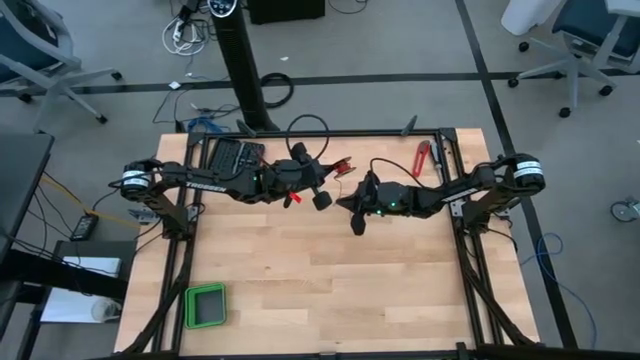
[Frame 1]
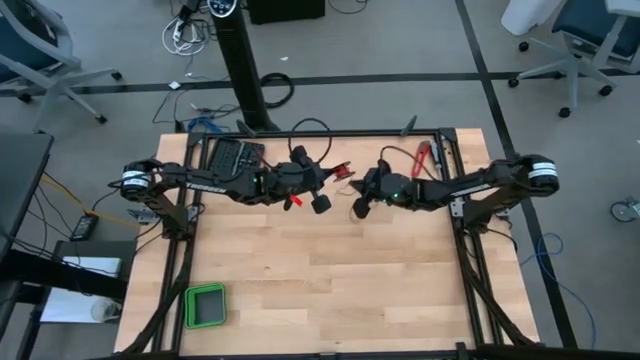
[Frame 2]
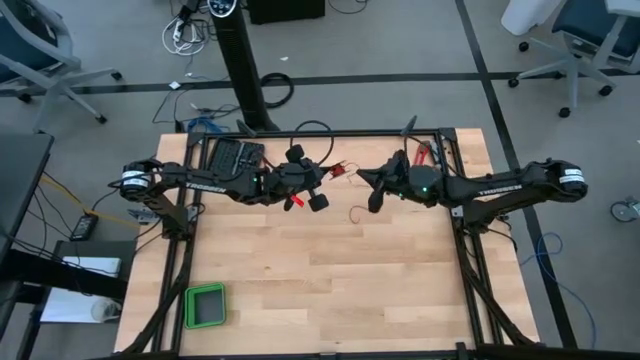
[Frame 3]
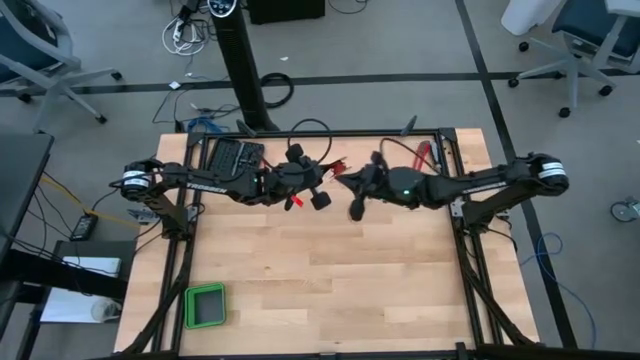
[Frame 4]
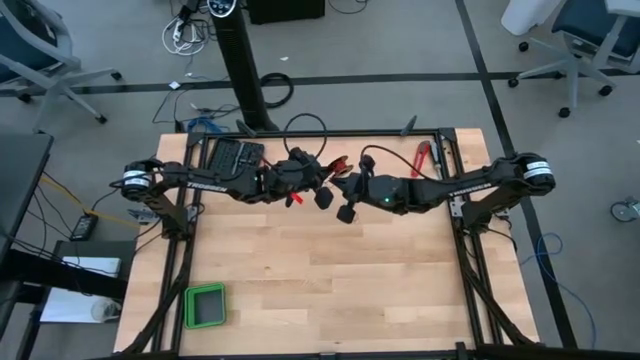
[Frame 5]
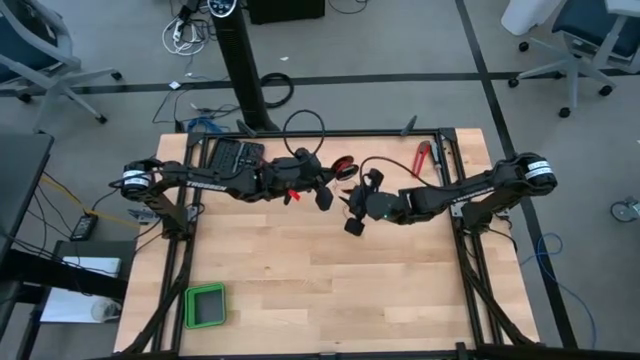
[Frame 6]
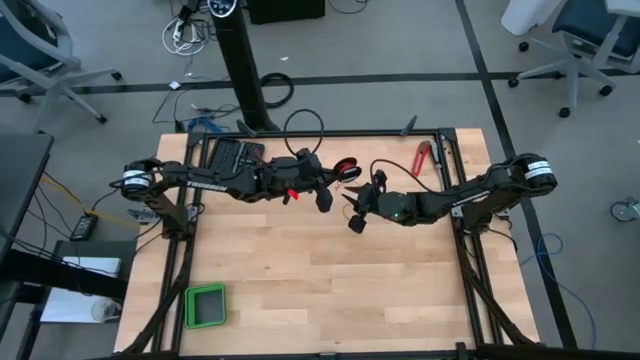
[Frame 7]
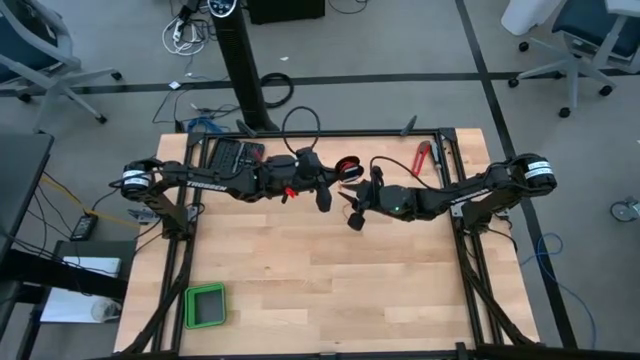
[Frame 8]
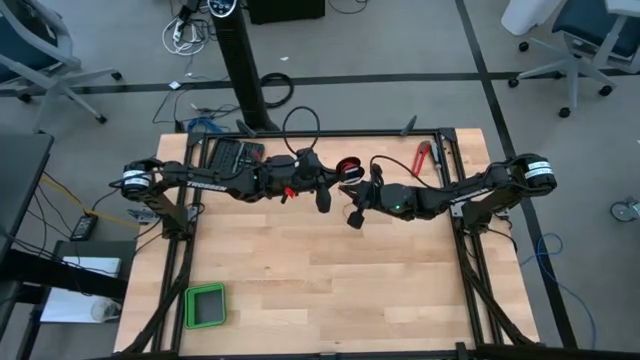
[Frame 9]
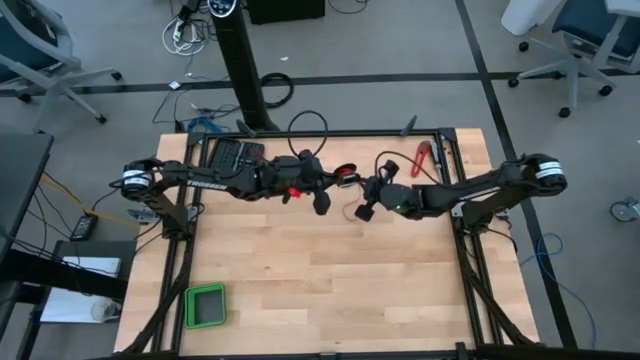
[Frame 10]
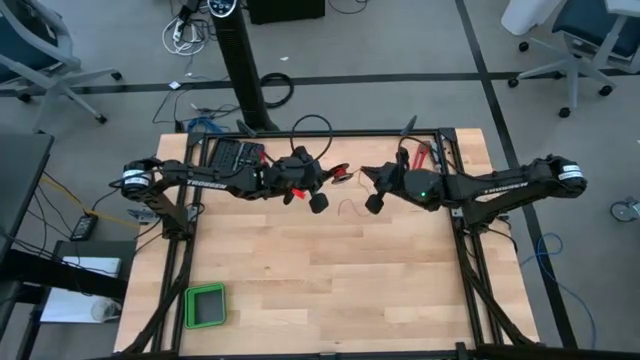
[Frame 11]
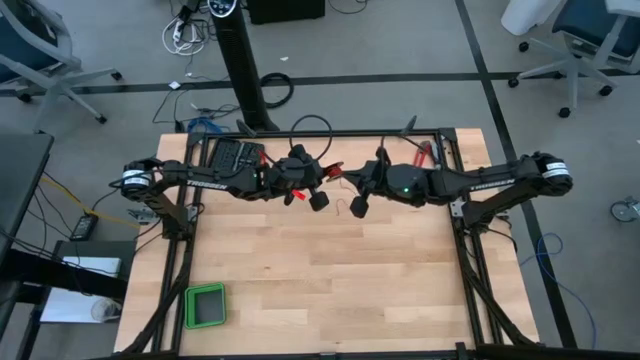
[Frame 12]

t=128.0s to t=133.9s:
Task: Coil cords
Coil the red wire onto the black spool

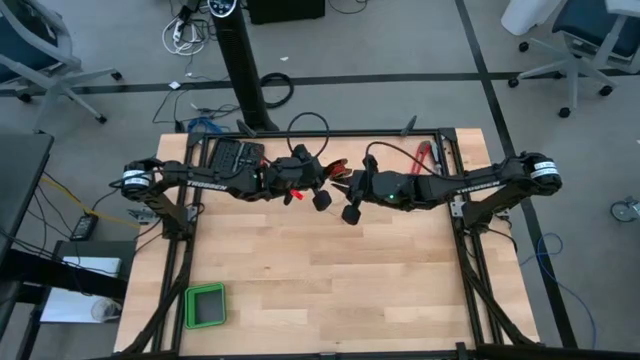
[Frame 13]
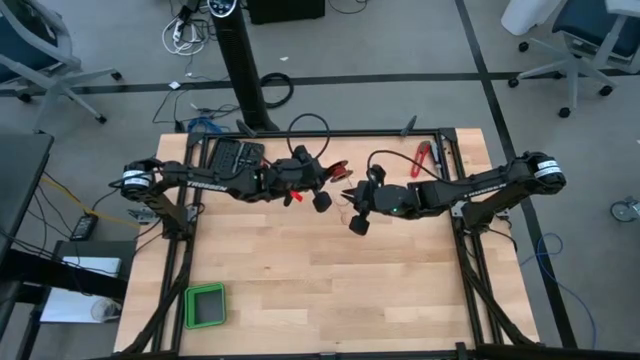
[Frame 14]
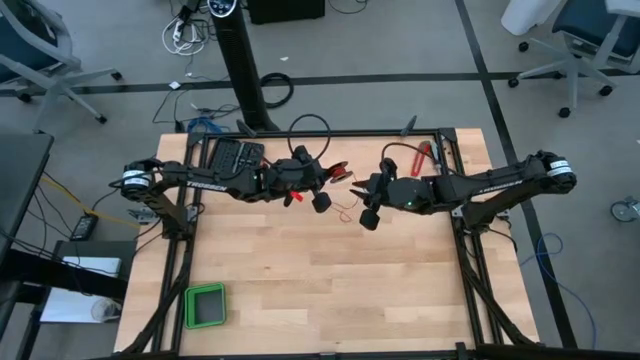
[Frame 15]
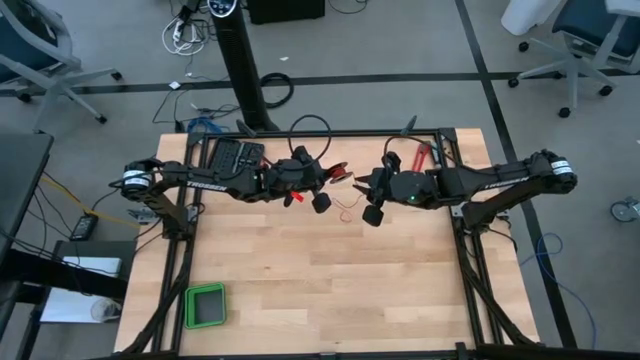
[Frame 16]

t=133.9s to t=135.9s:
Coil the red wire onto the black spool

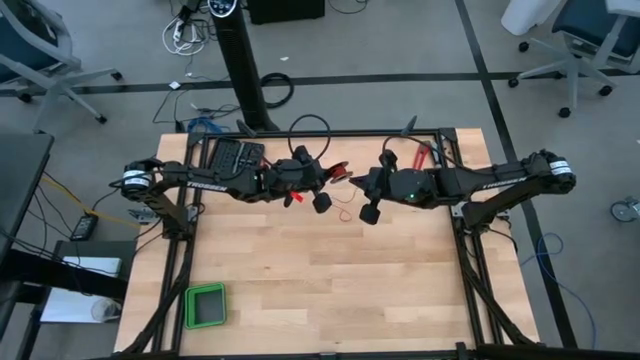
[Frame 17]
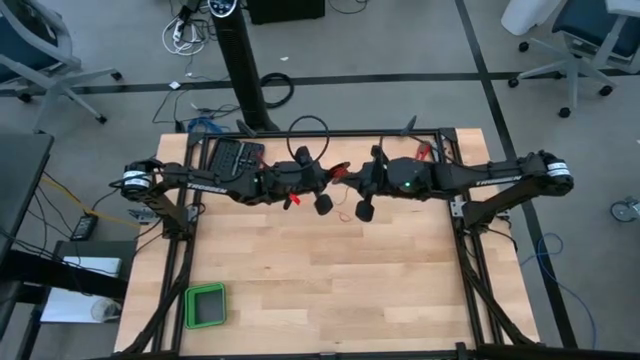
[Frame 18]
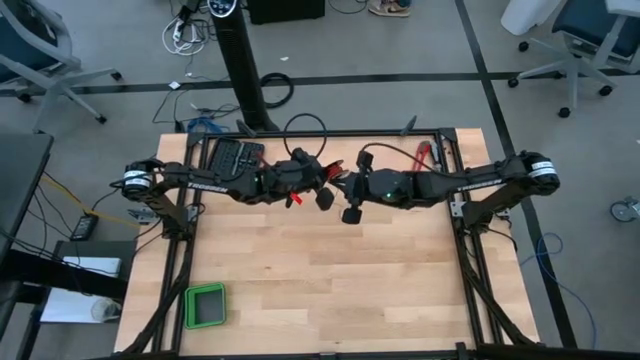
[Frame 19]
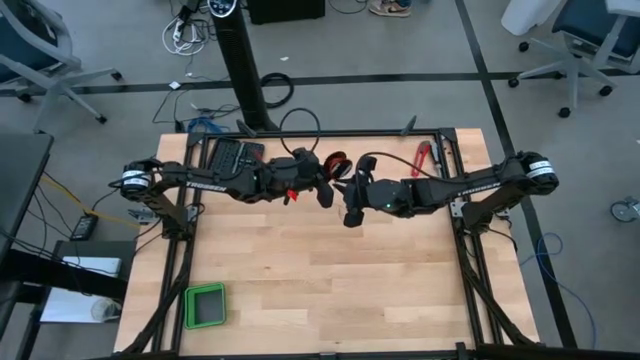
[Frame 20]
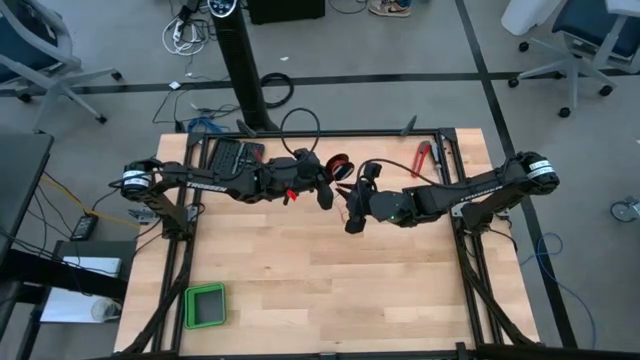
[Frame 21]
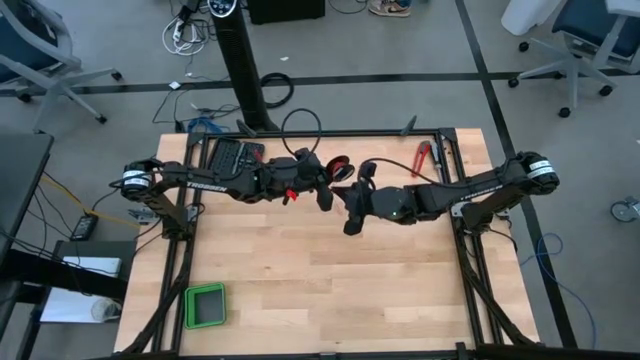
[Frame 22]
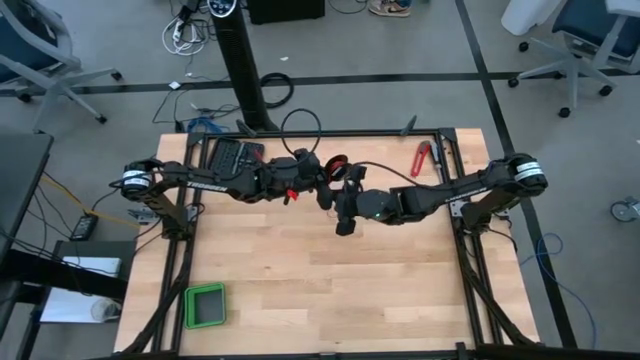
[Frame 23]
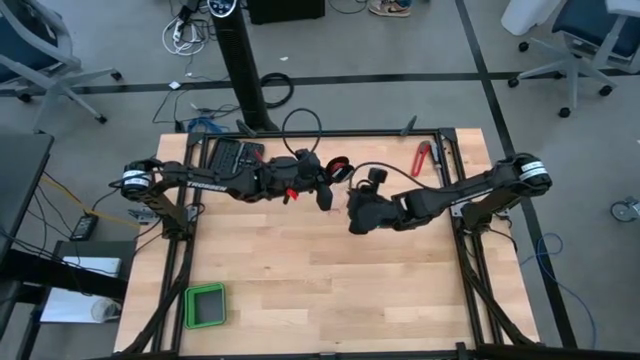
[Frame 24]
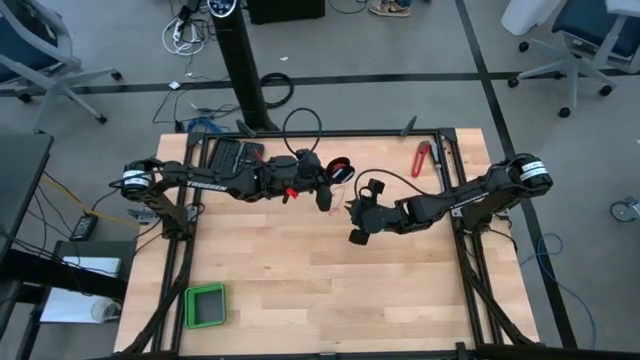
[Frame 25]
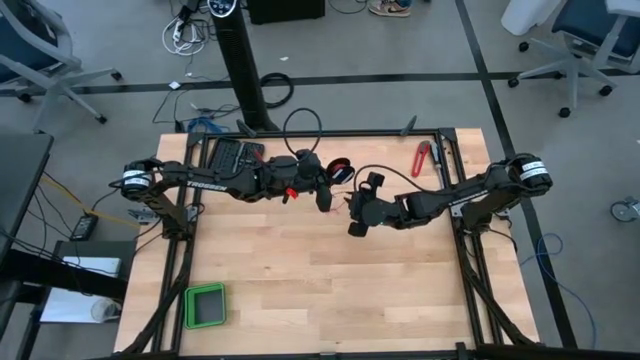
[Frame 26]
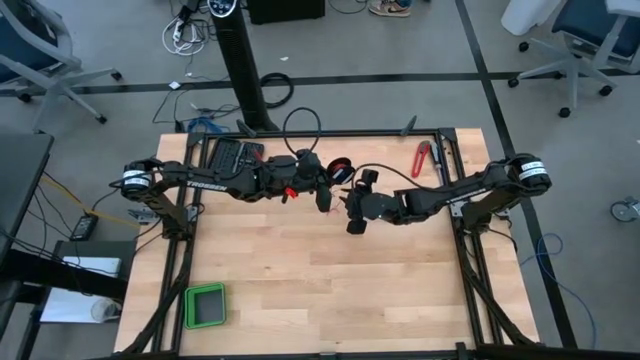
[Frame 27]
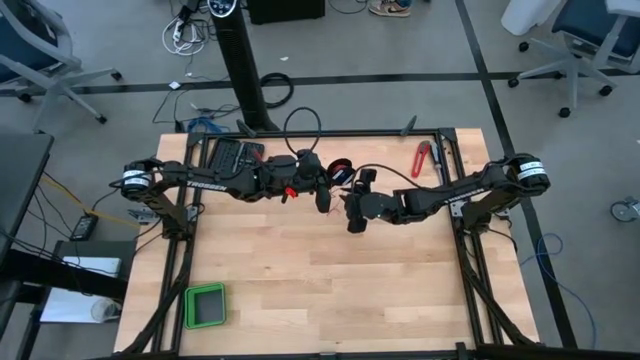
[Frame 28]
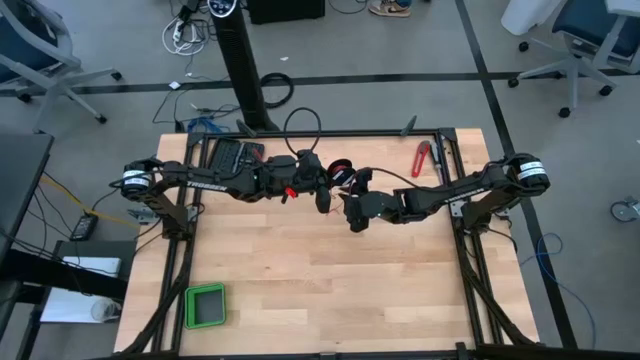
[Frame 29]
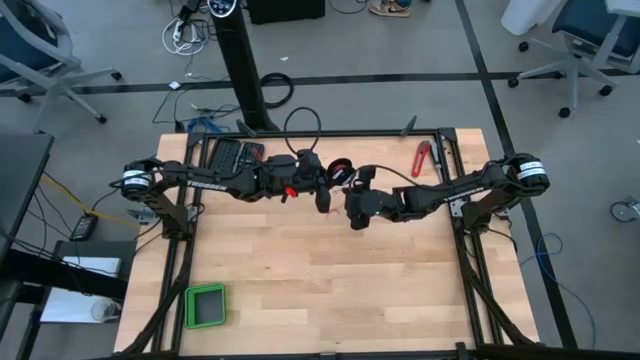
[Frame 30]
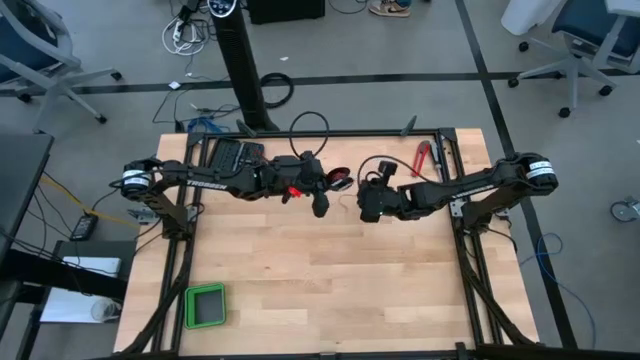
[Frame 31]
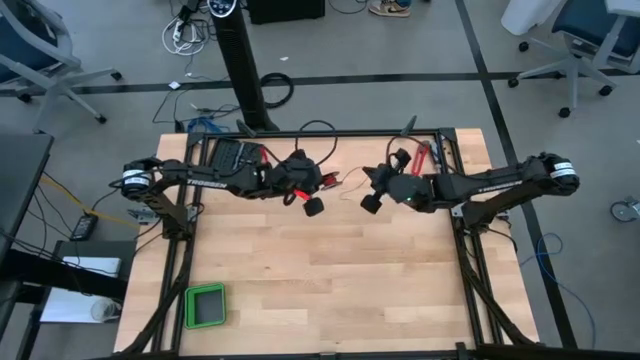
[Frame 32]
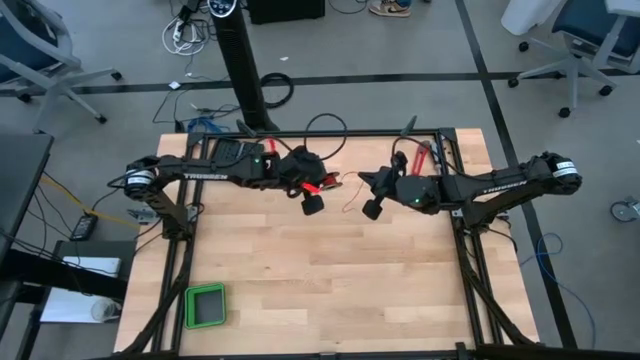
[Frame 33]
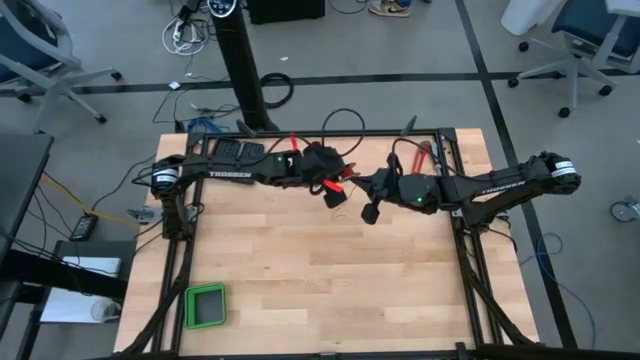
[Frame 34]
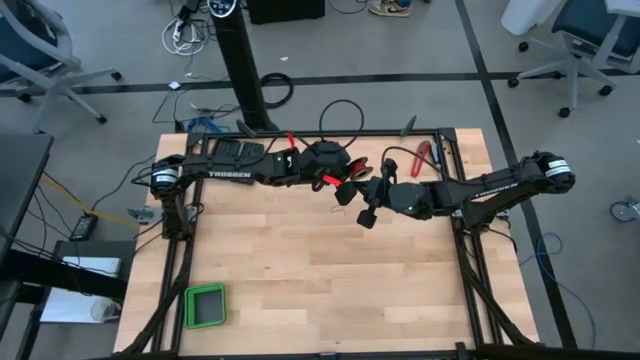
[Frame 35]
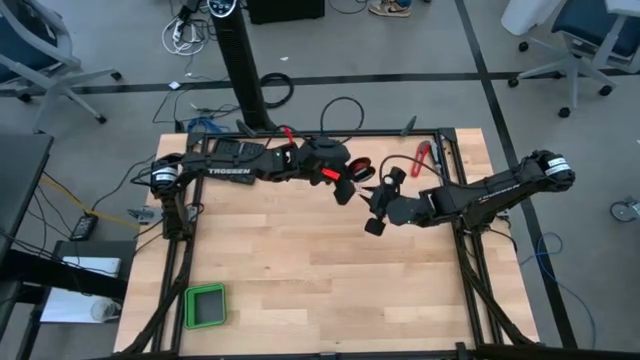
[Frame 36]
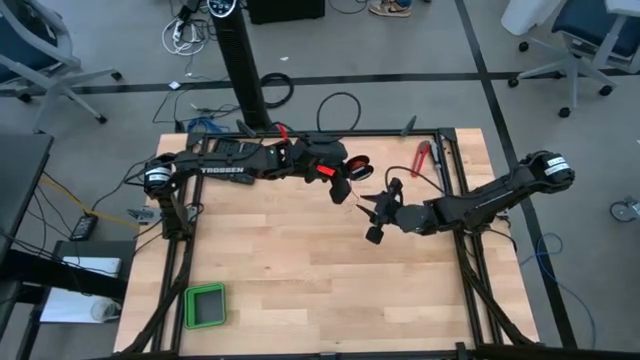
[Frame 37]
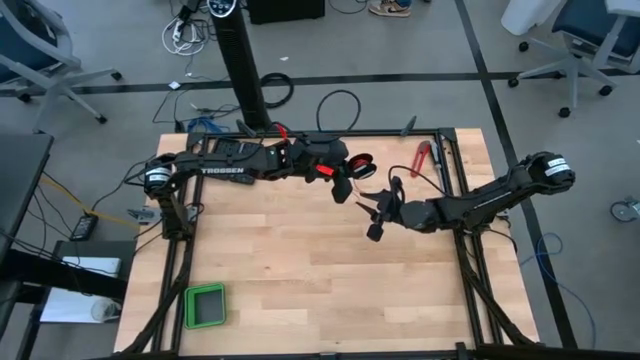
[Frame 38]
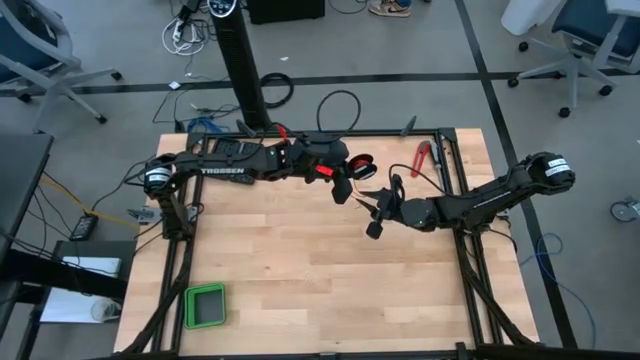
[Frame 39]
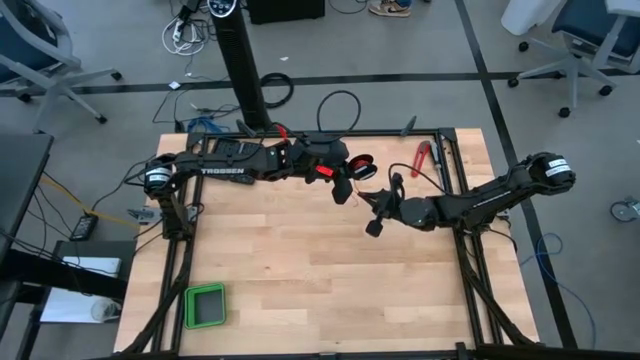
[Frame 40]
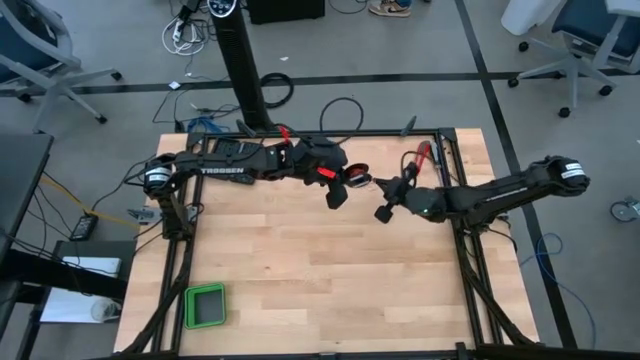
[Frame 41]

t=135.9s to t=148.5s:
Coil the red wire onto the black spool
